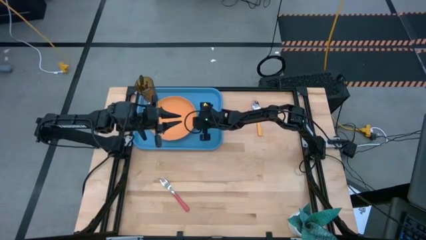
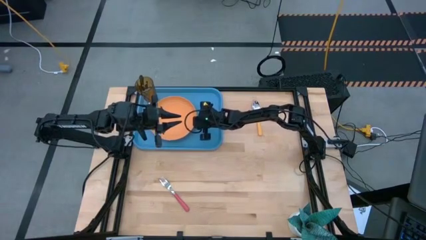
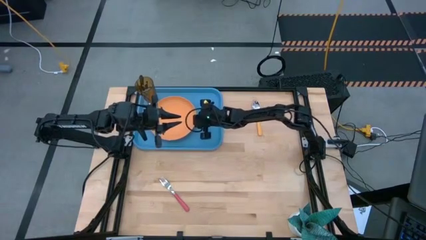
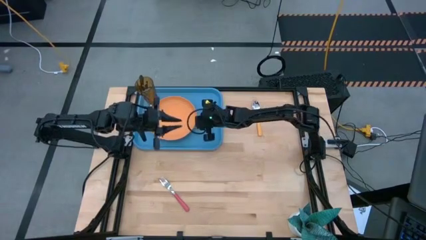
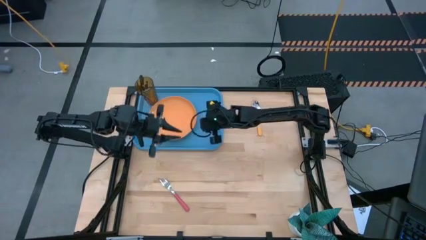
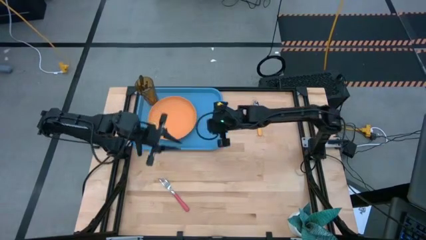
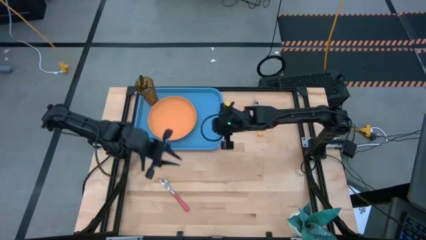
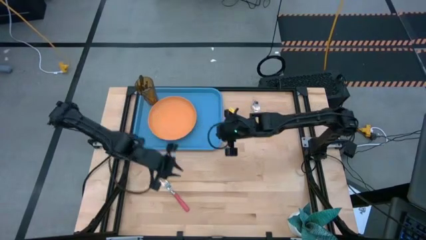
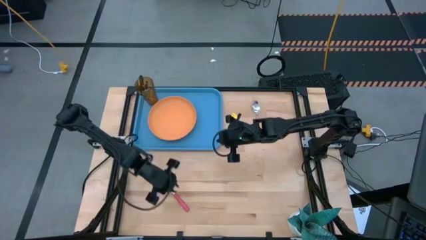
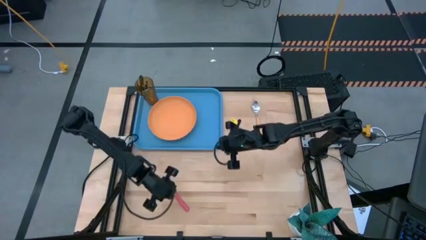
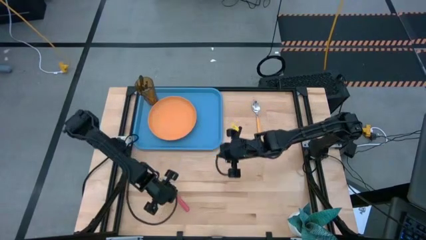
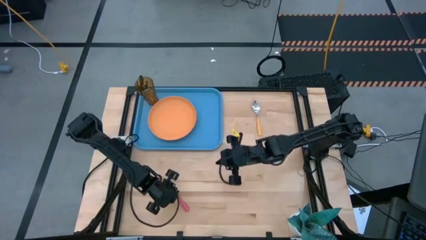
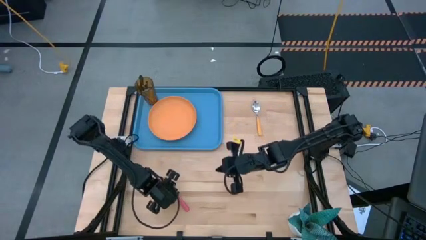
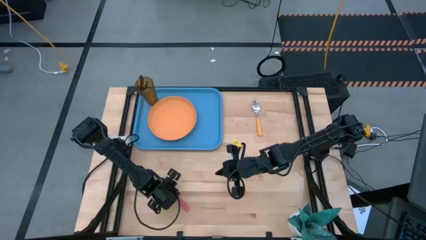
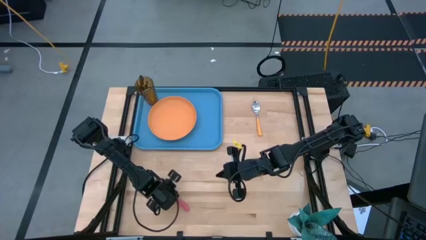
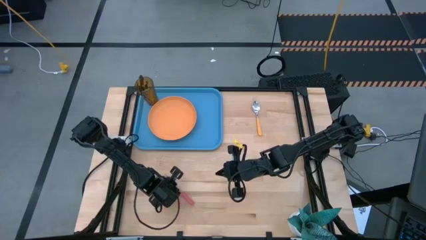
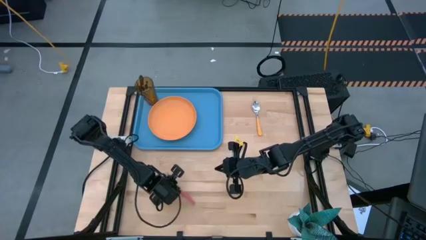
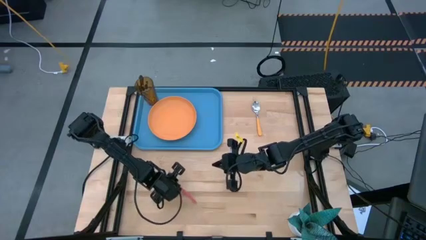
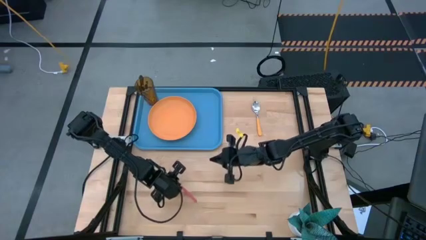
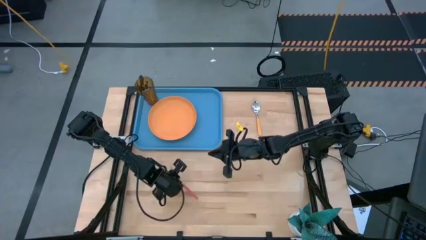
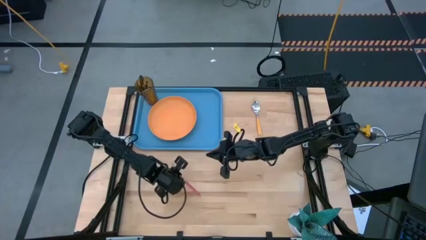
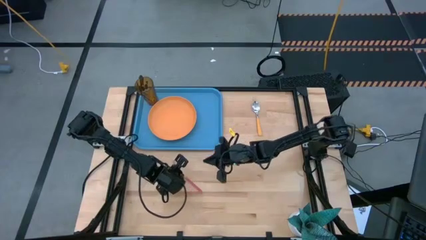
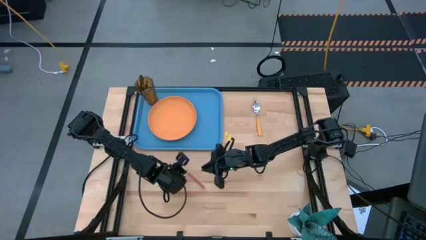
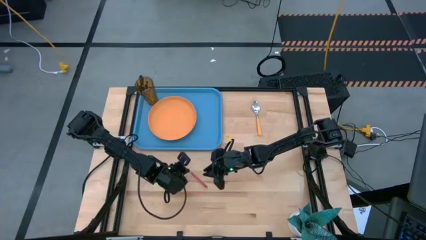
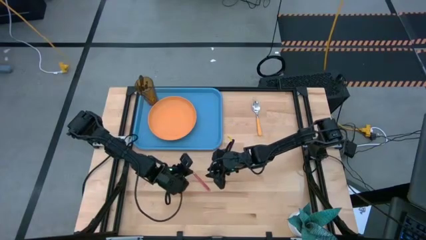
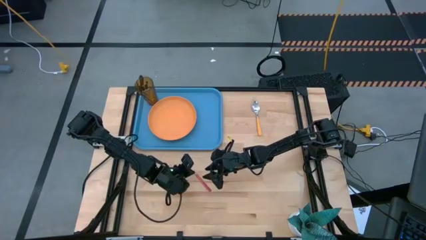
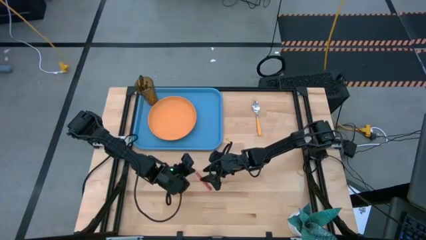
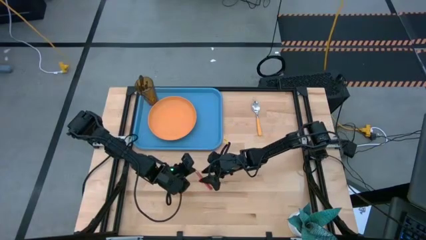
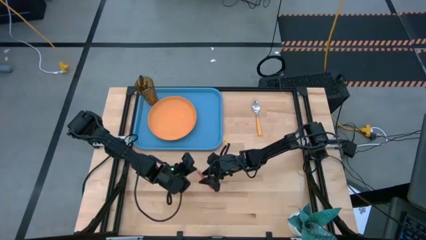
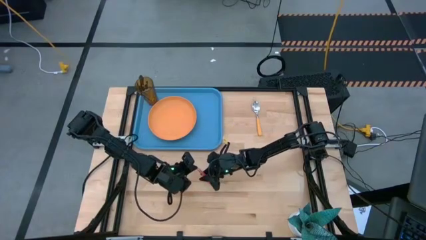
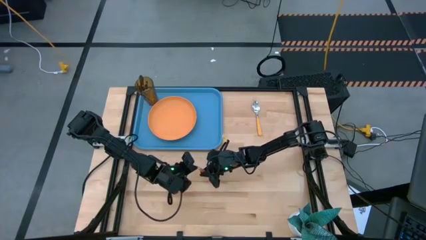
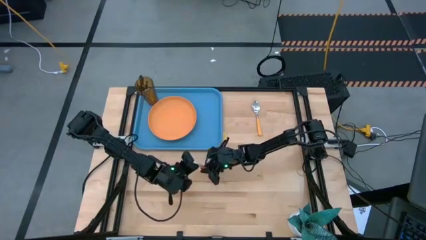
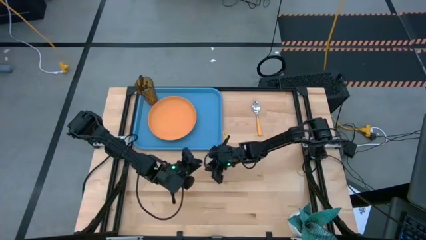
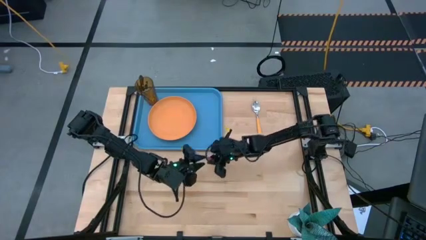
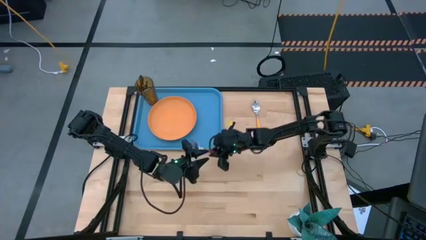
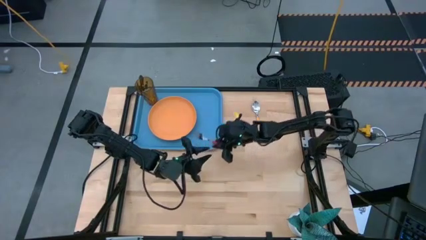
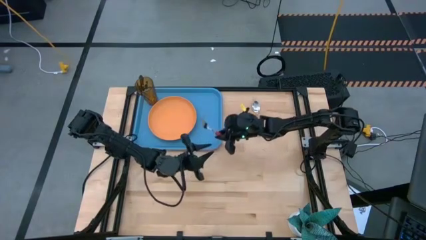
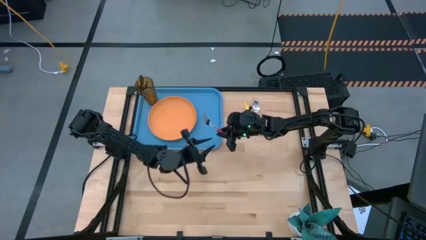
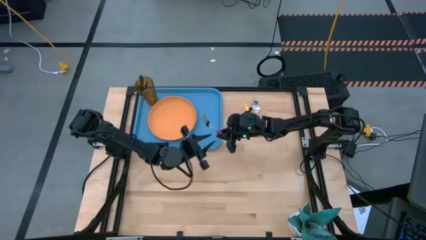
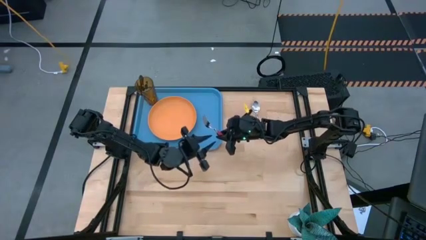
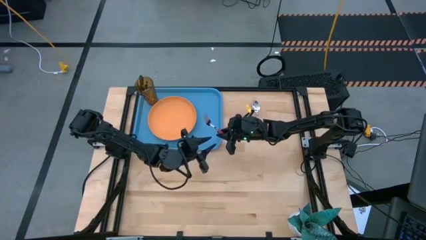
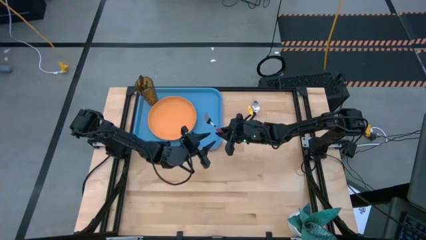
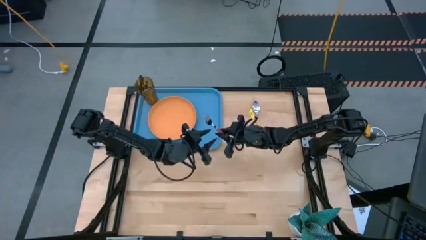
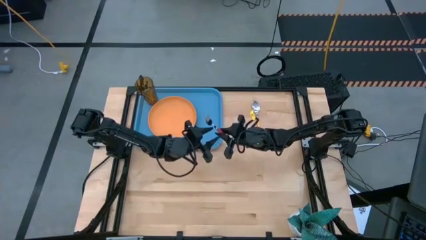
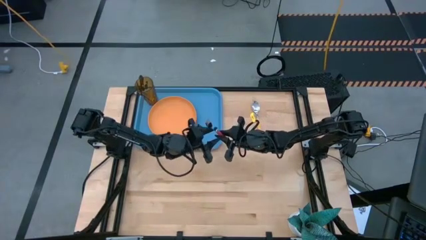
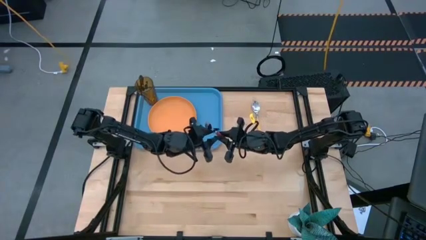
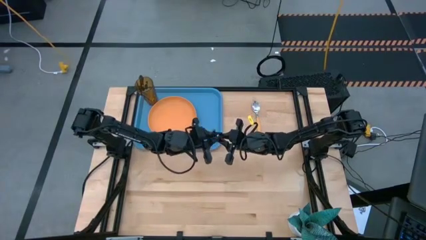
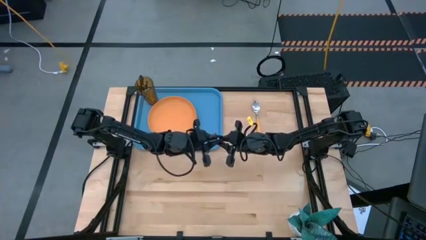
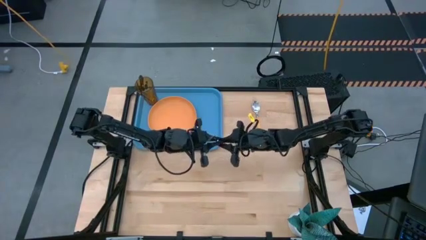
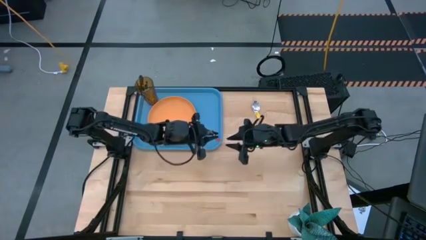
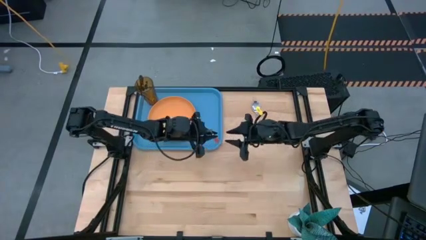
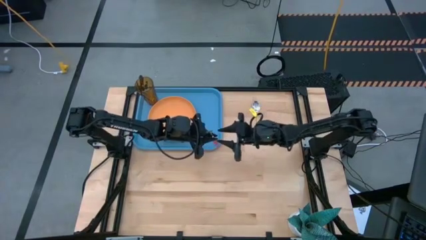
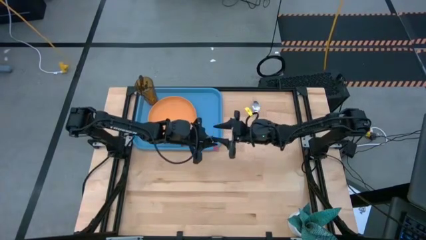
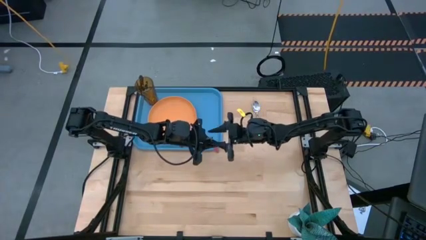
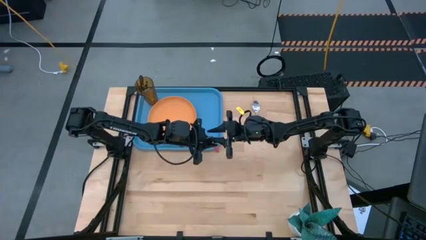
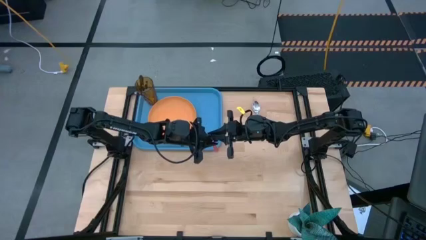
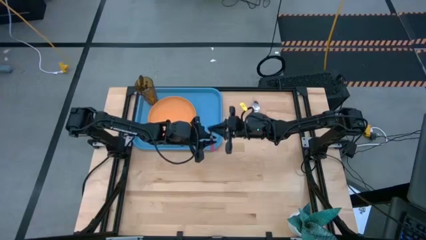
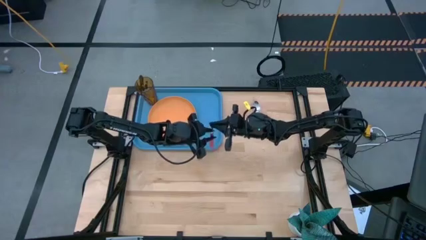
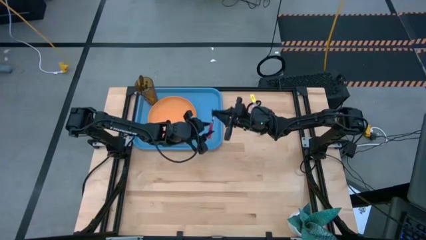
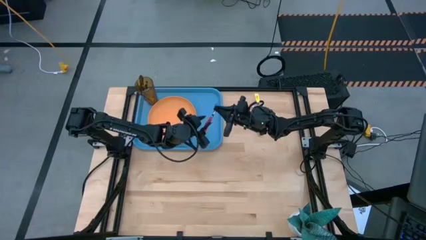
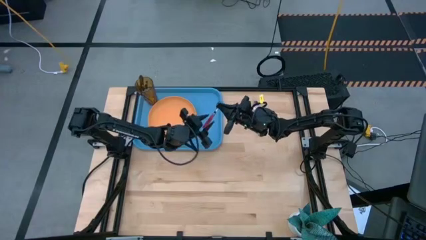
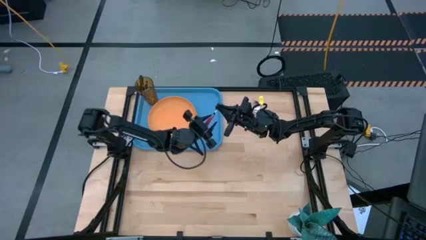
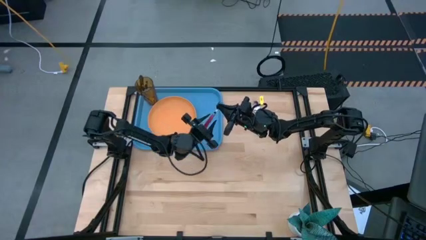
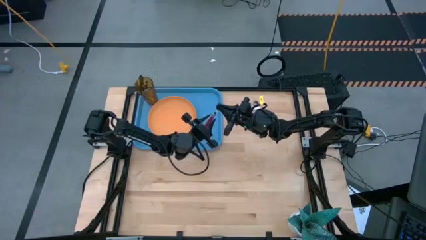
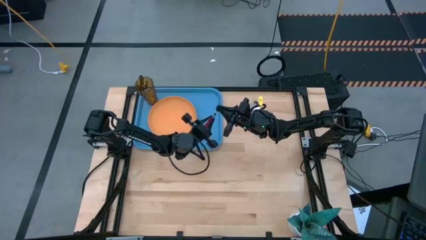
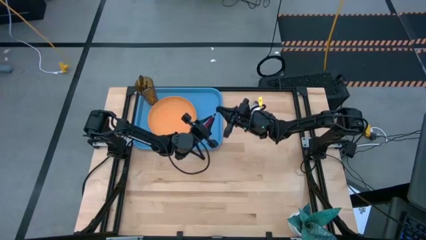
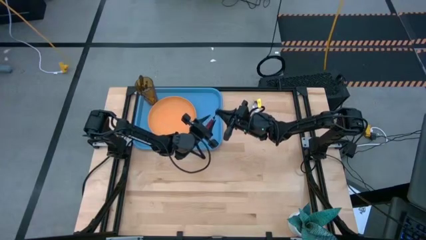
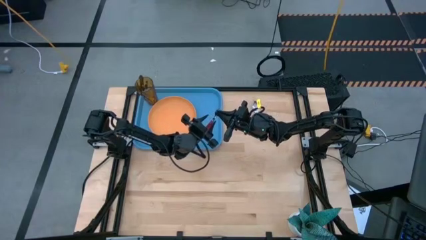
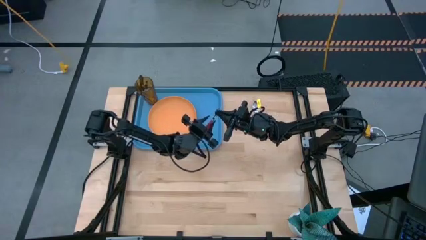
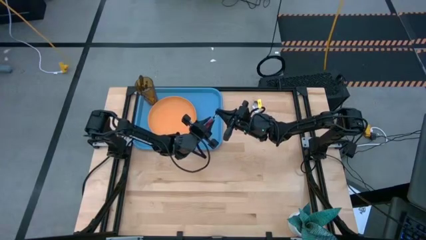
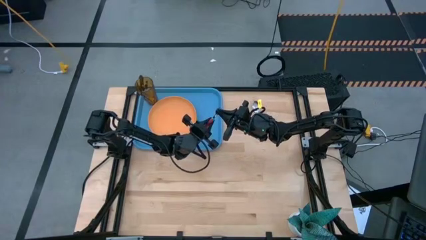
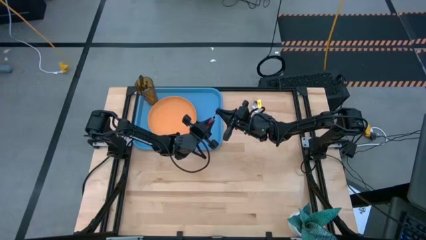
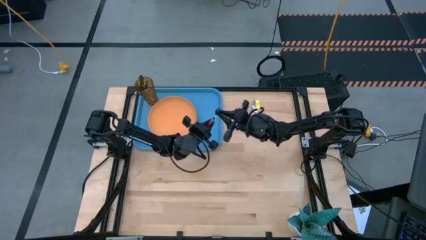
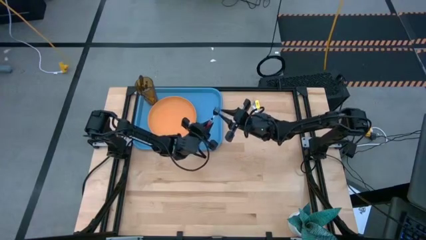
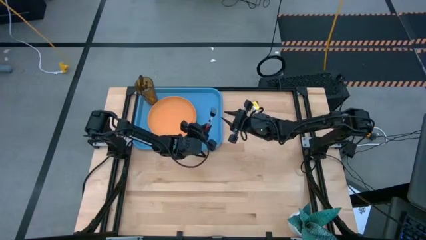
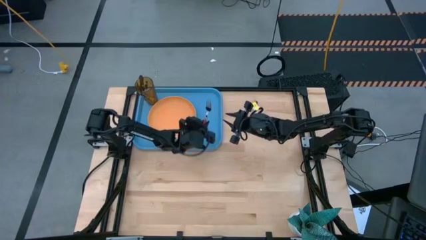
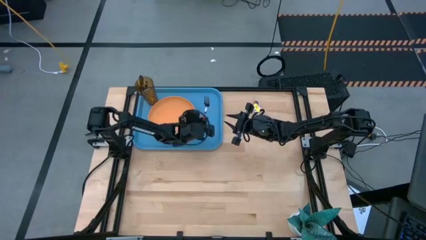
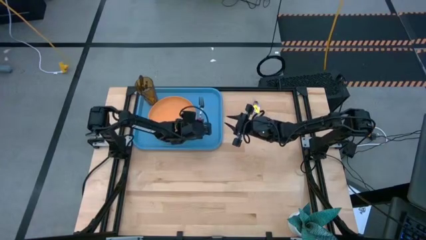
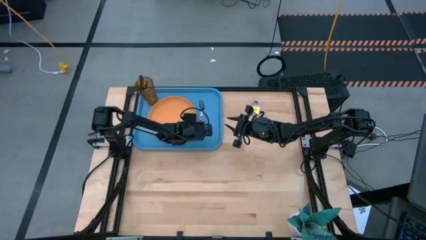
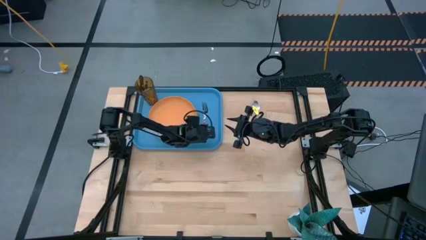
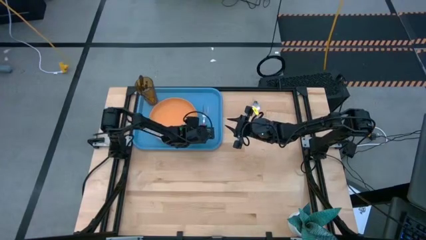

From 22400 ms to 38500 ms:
Task: Pick and place plate/cup/fork/spoon on tray
Put the red fork on the blue tray
